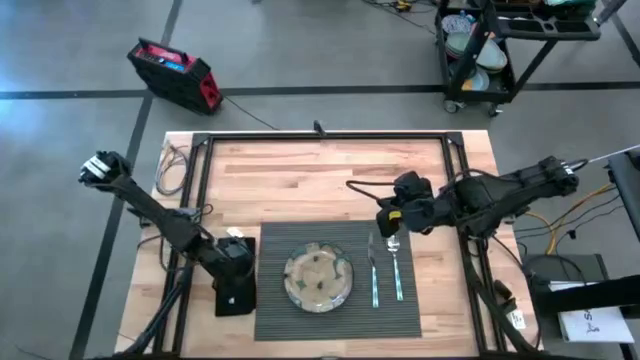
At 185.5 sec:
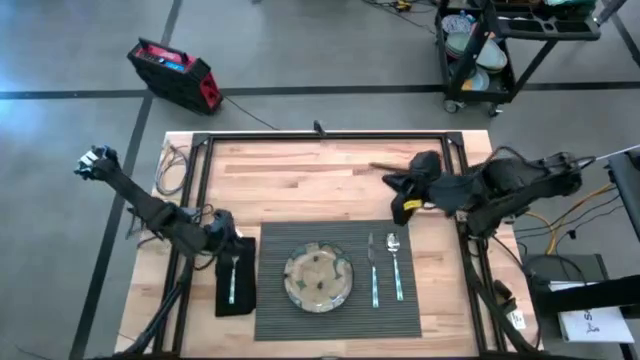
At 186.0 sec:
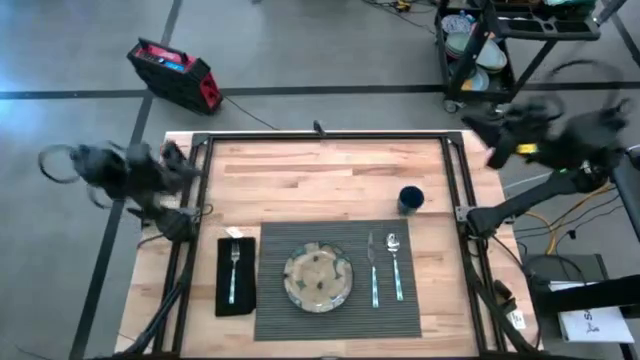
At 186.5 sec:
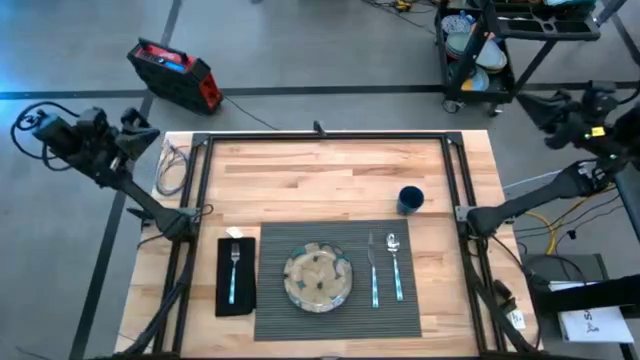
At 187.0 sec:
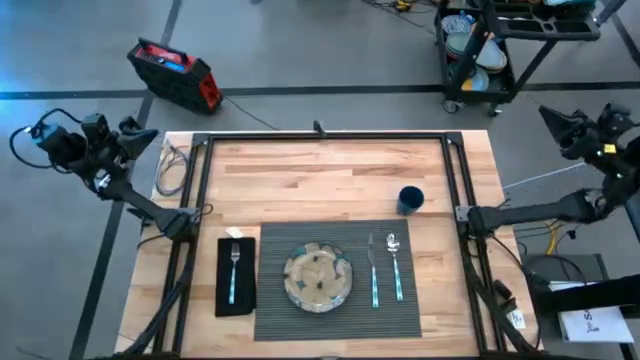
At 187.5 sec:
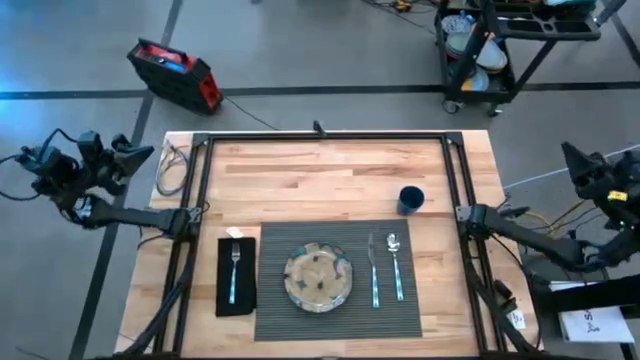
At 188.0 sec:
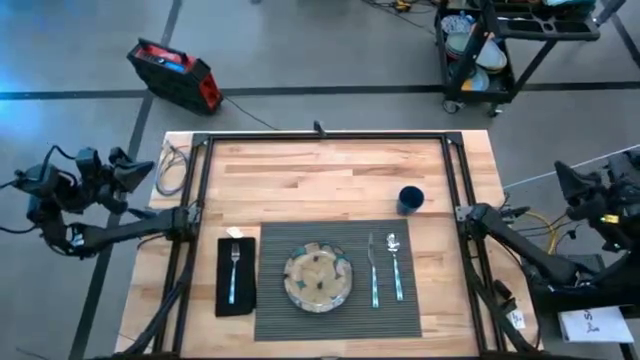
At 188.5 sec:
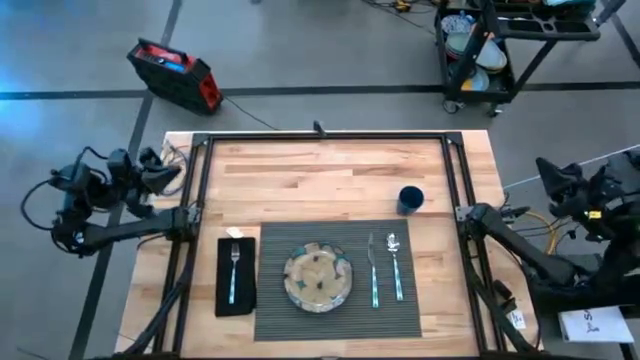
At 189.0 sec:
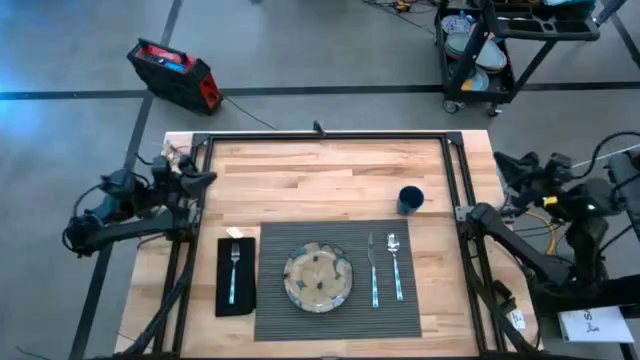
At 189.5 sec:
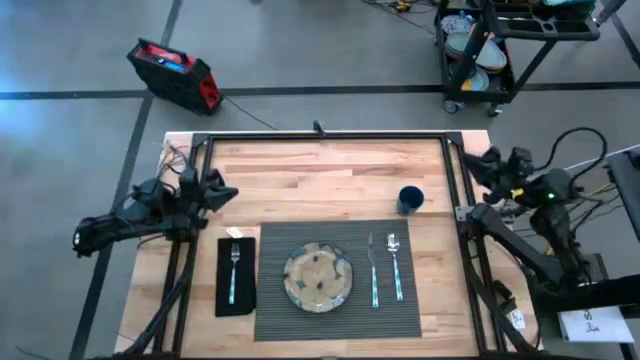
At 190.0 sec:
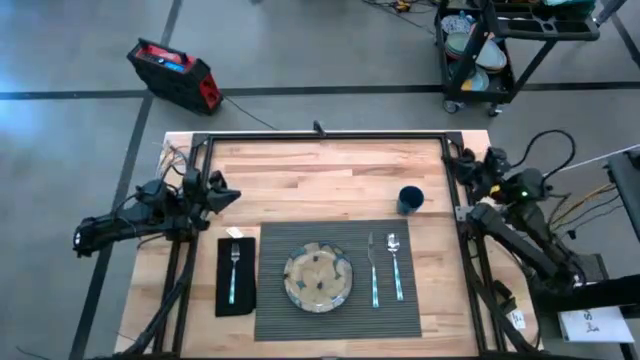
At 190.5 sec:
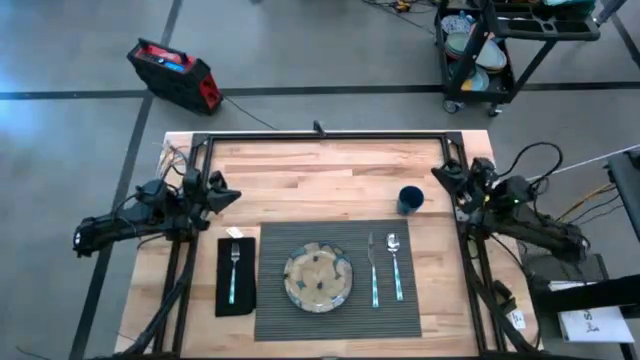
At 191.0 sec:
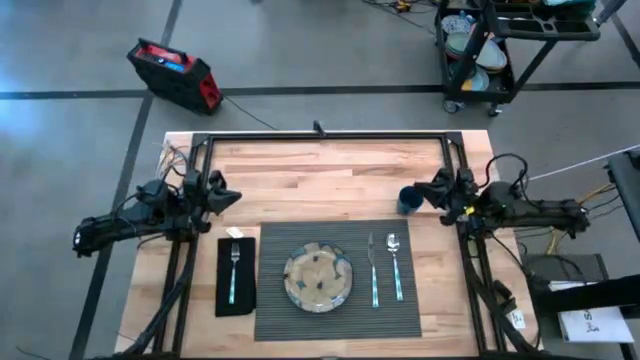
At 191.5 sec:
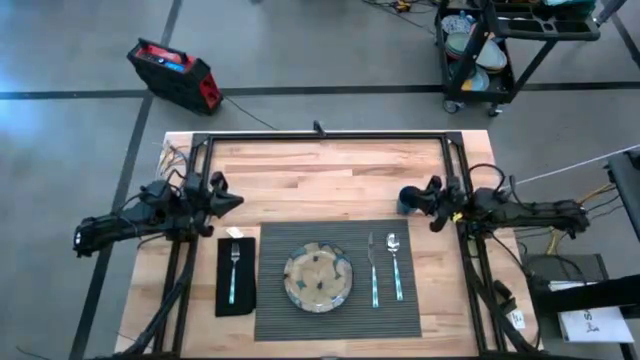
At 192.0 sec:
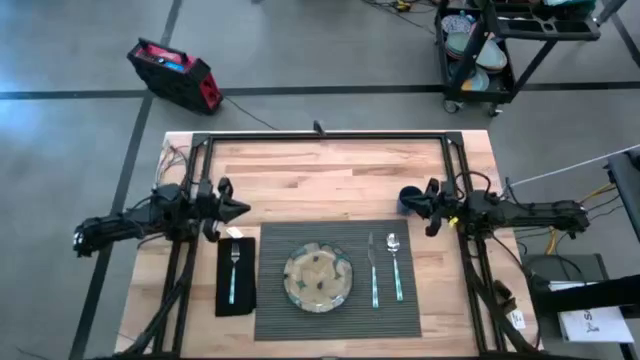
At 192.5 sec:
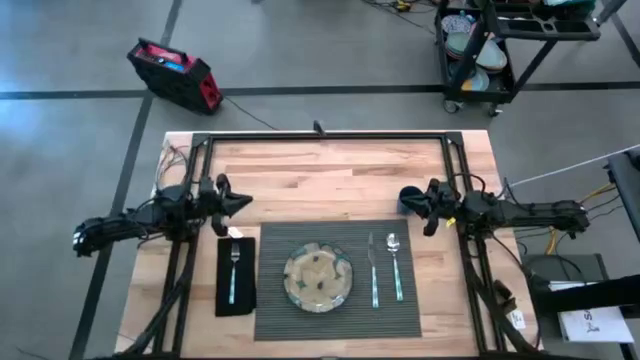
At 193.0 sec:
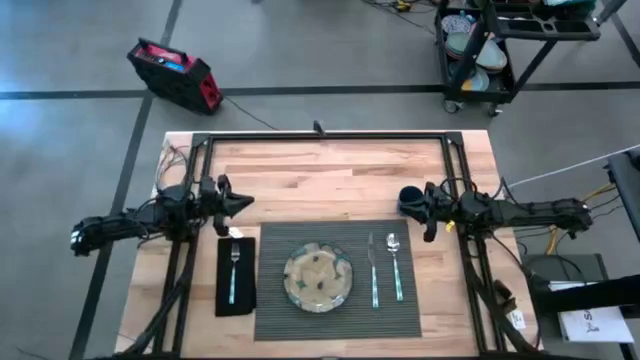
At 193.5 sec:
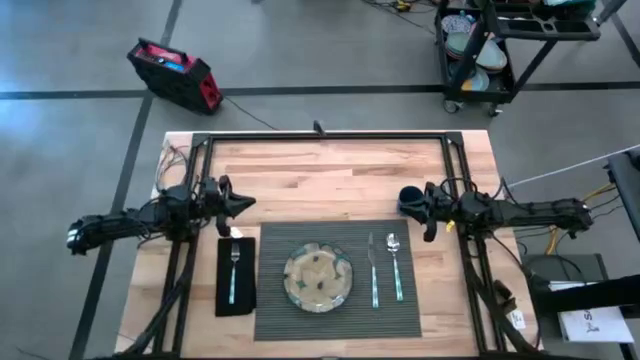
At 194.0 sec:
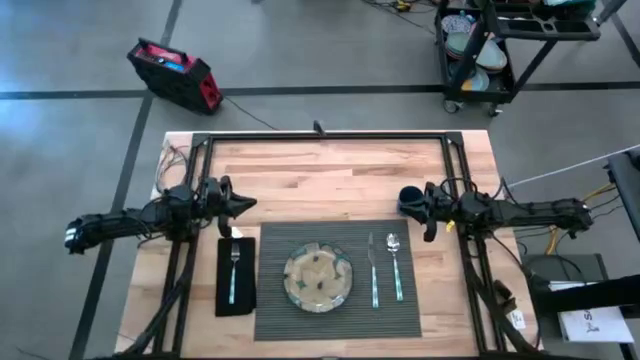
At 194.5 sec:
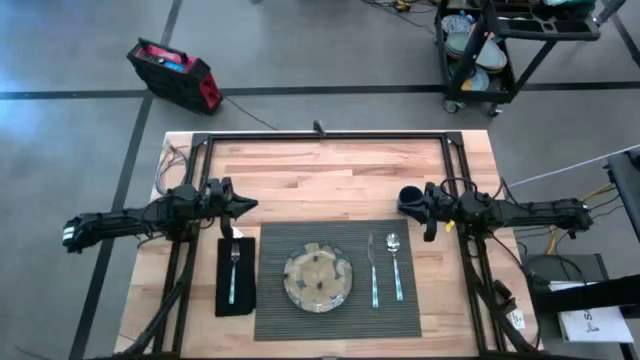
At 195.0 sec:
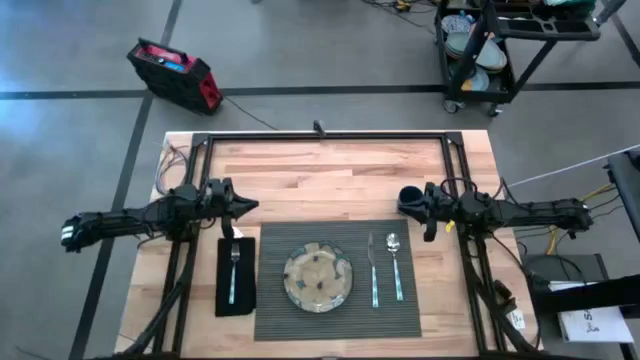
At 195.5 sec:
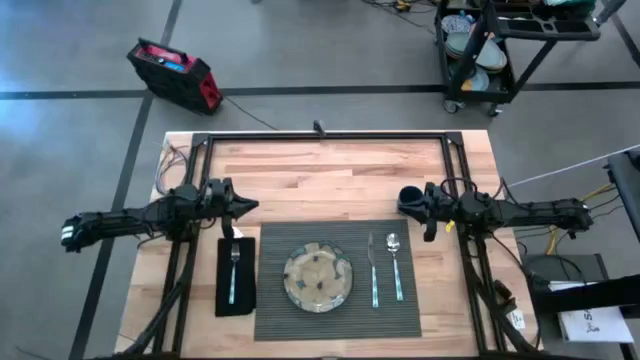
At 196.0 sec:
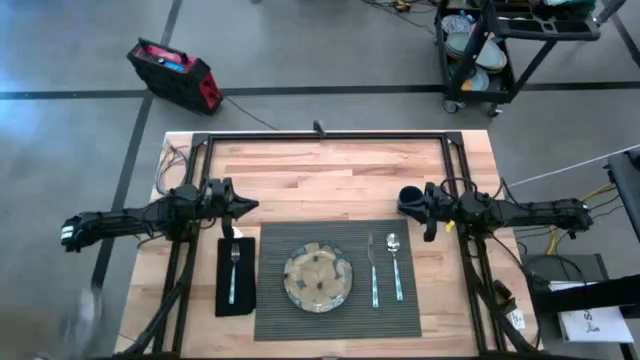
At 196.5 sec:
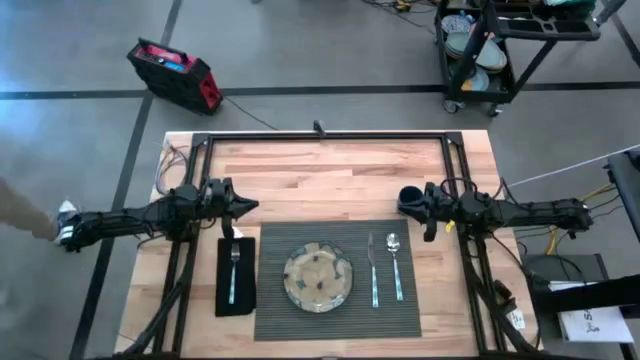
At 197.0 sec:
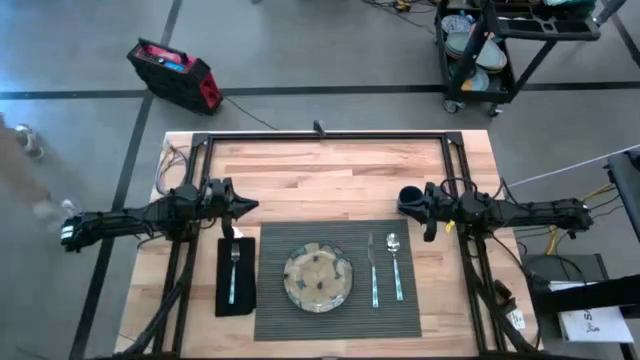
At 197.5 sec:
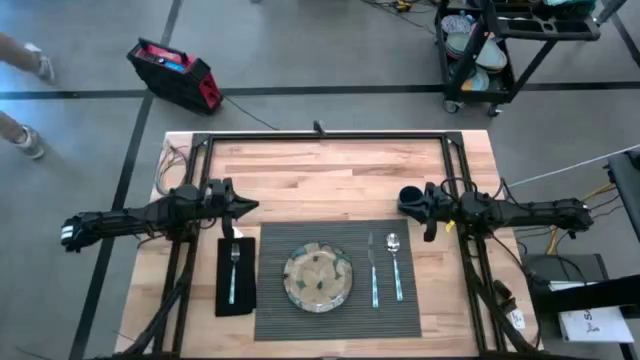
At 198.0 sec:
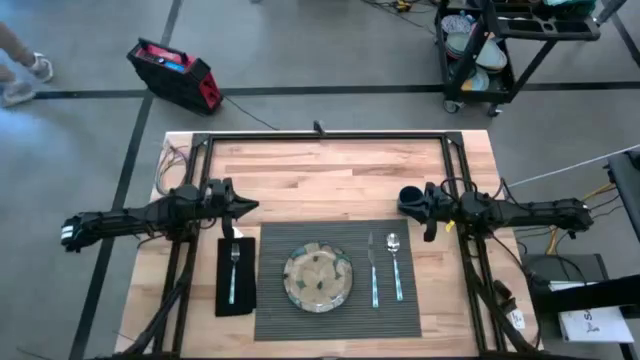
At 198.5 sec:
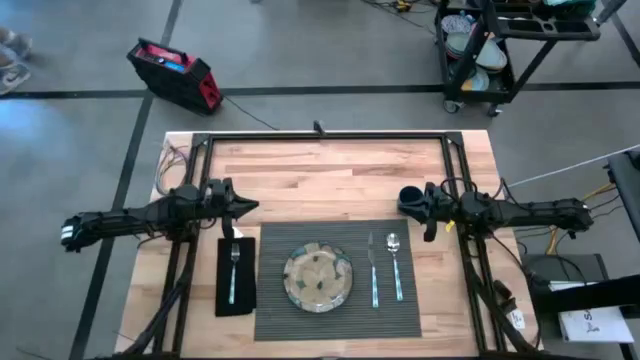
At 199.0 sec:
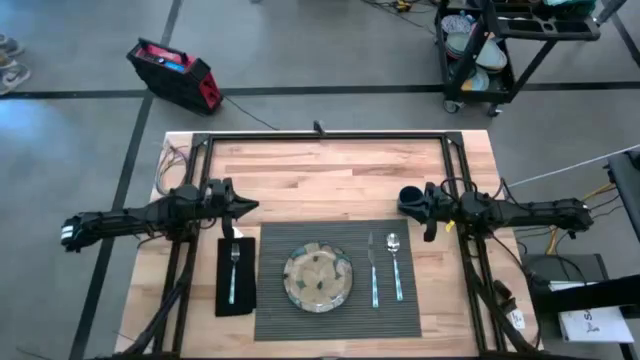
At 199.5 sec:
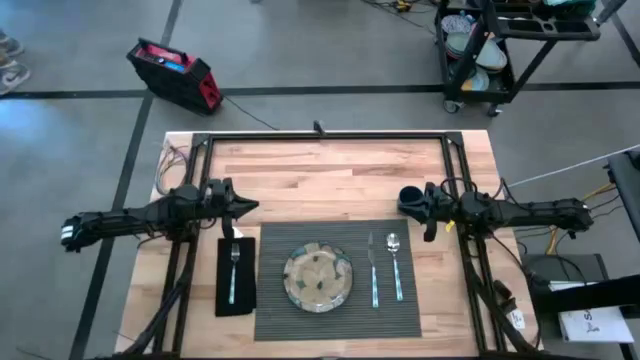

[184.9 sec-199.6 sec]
Task: Set table place
Return to Home Position

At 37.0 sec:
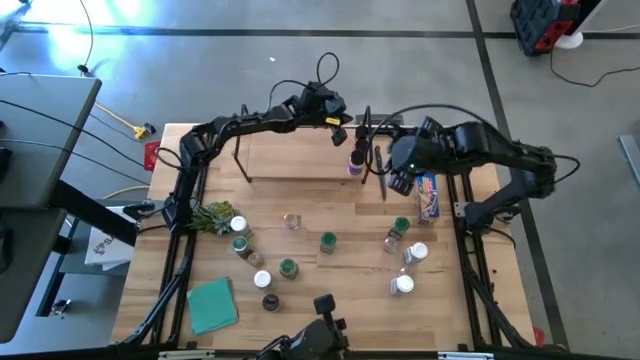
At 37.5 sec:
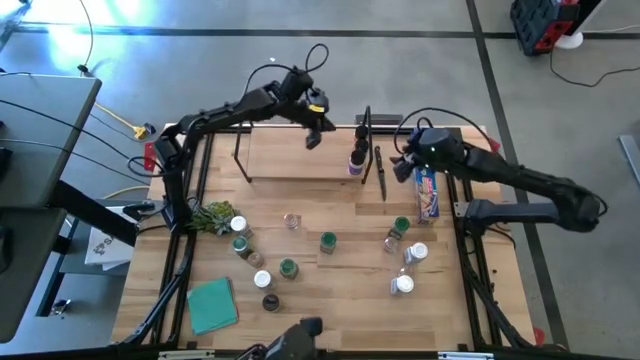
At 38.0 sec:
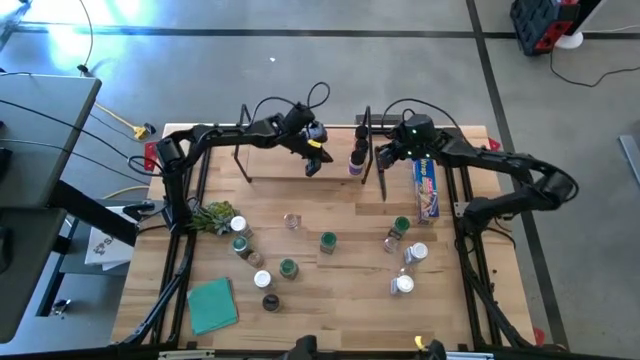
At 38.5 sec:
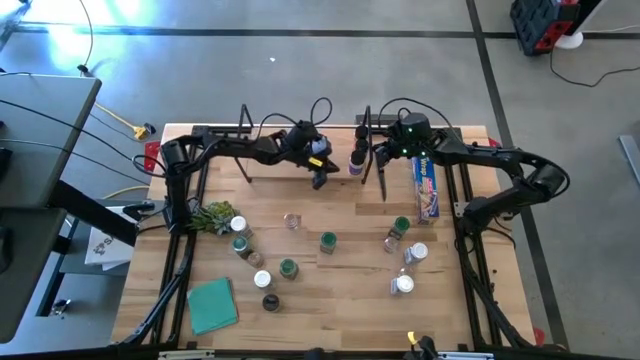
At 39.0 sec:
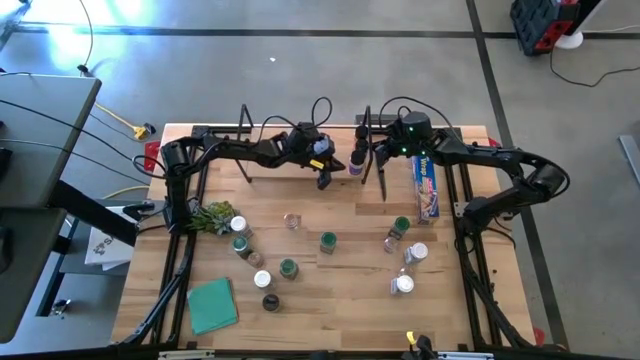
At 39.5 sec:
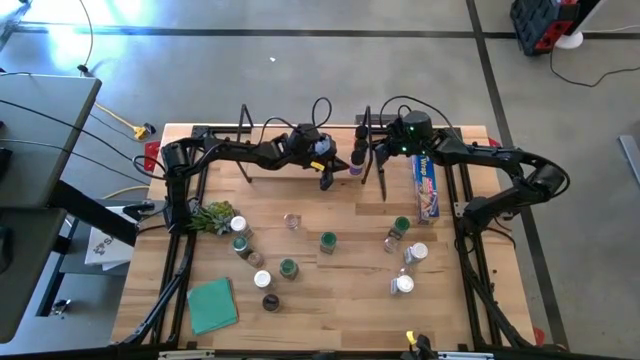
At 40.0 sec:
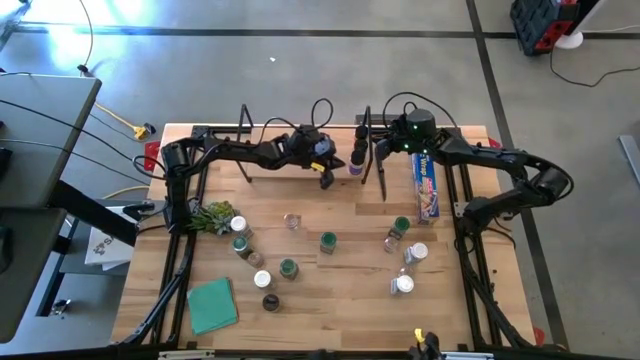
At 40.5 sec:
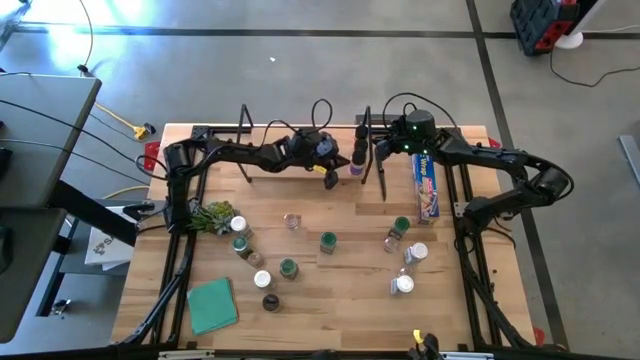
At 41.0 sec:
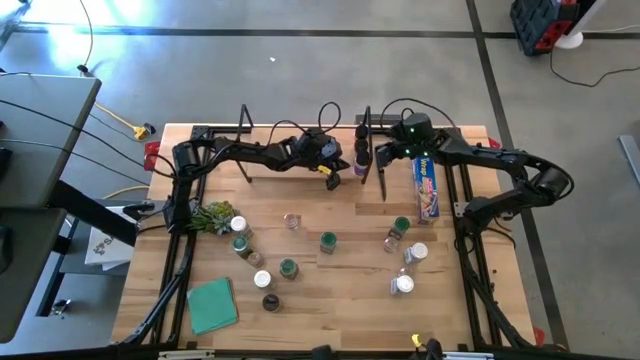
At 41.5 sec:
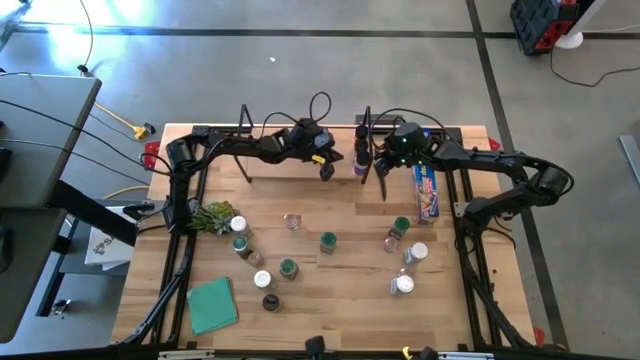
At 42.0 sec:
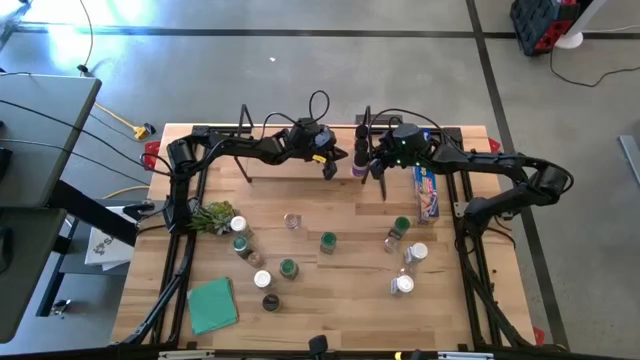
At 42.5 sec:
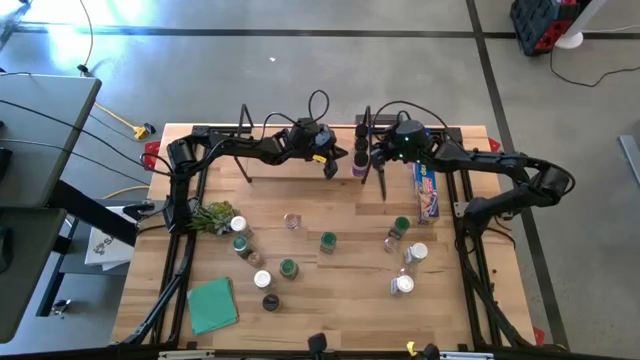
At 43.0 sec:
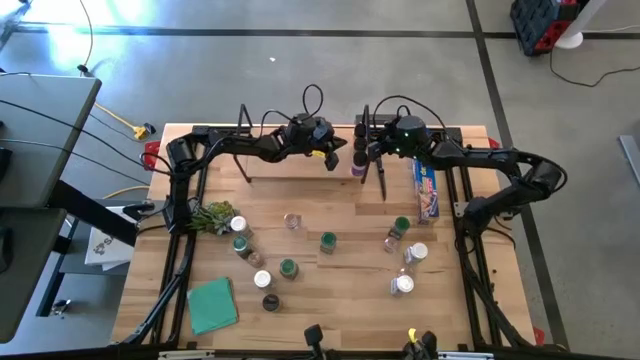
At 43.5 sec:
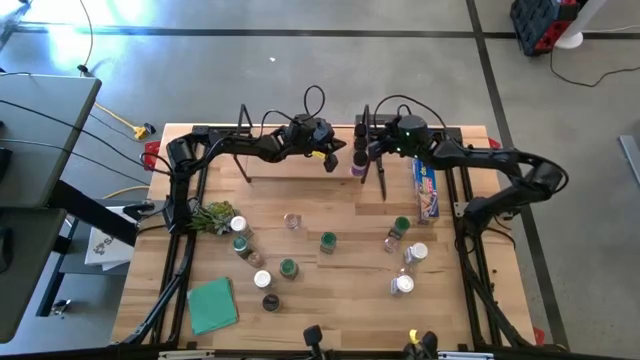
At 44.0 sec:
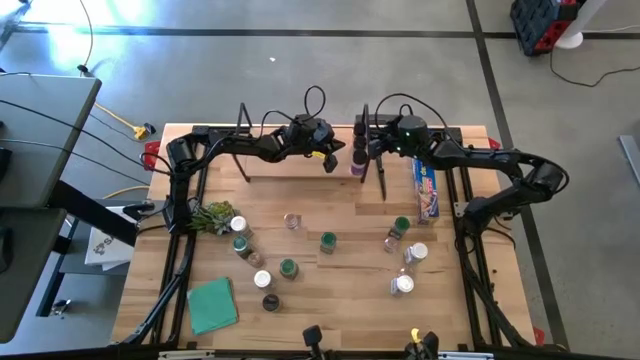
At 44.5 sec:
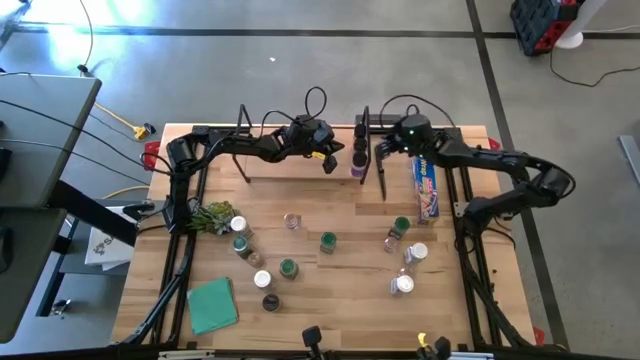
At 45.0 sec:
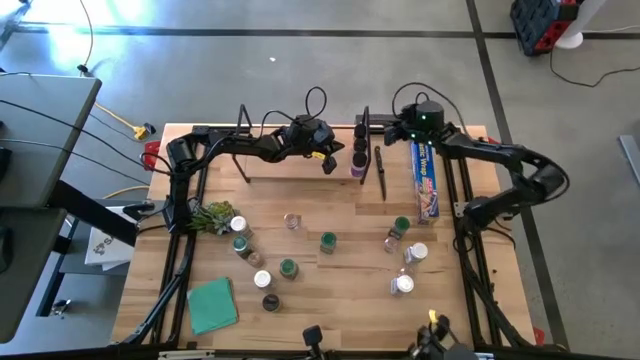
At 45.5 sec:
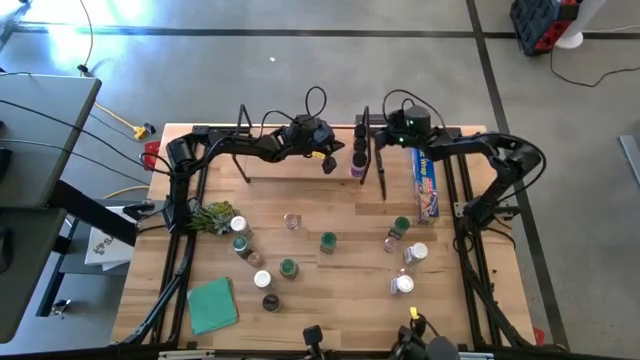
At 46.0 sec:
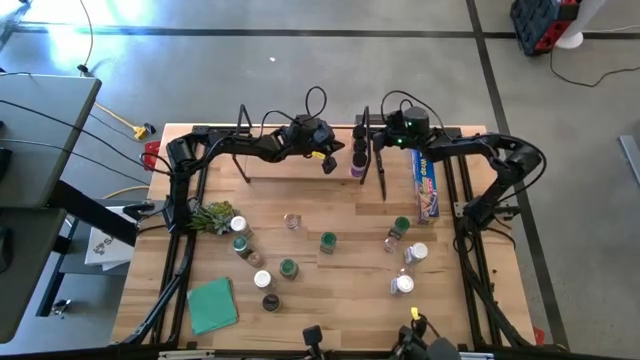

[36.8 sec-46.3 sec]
Task: Shelf spices
Adjust the black seasoning bottles on the shelf
